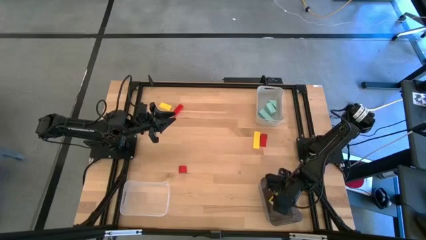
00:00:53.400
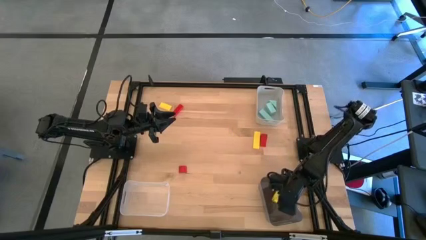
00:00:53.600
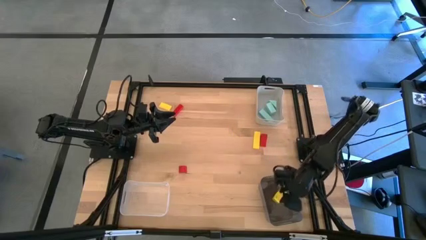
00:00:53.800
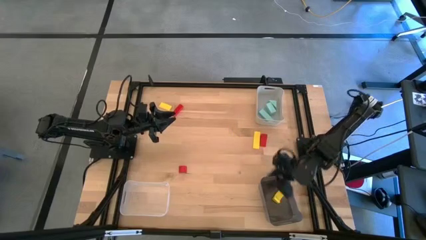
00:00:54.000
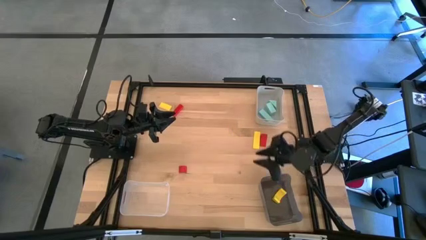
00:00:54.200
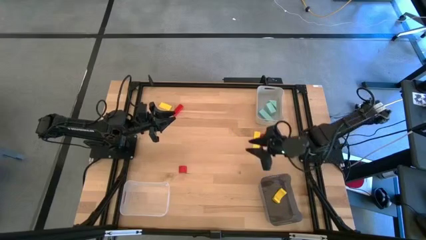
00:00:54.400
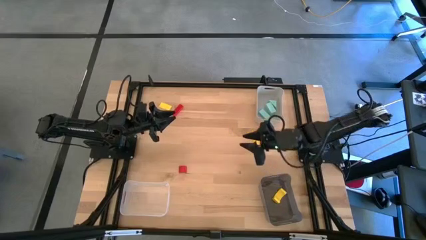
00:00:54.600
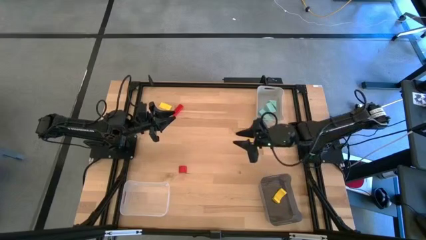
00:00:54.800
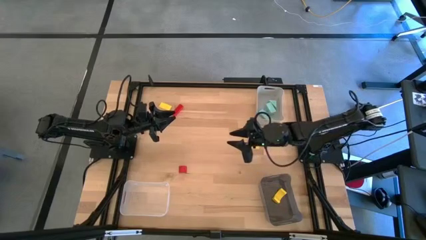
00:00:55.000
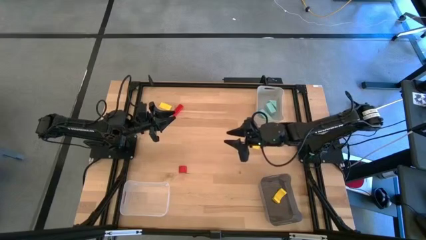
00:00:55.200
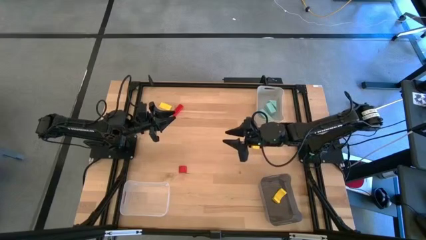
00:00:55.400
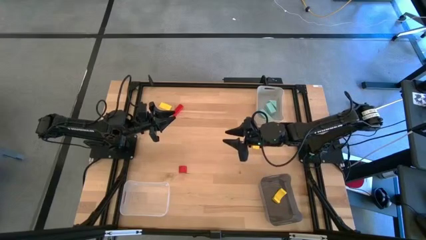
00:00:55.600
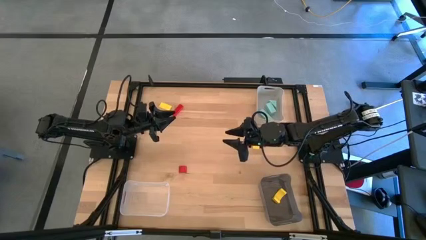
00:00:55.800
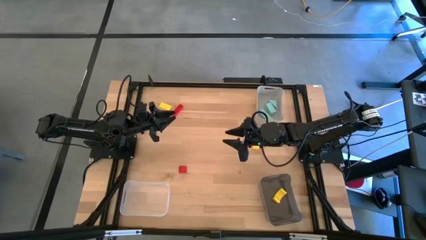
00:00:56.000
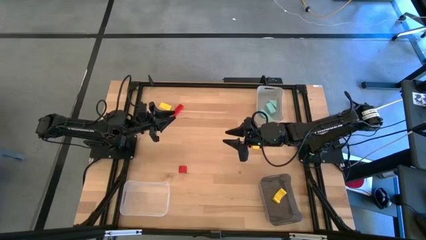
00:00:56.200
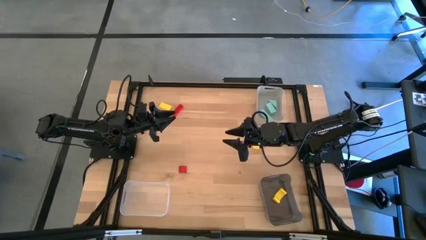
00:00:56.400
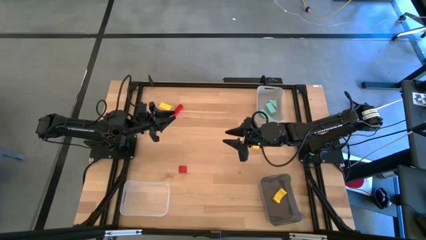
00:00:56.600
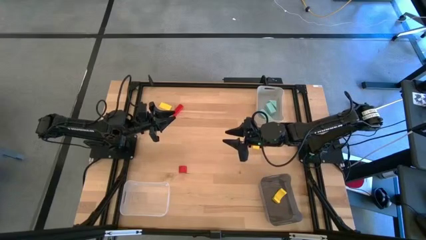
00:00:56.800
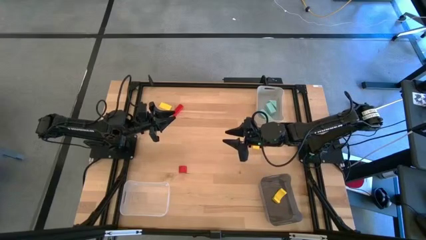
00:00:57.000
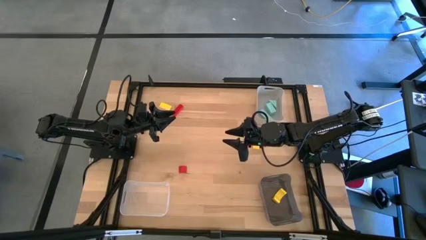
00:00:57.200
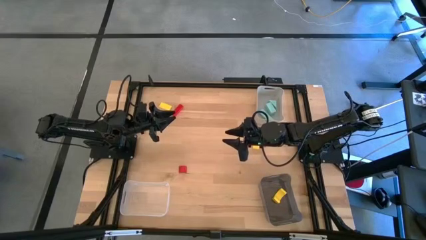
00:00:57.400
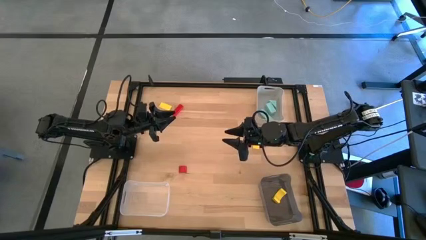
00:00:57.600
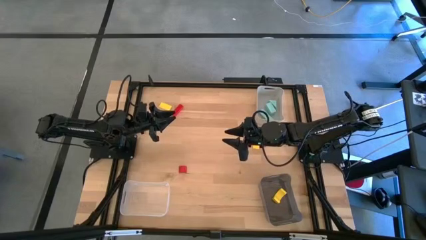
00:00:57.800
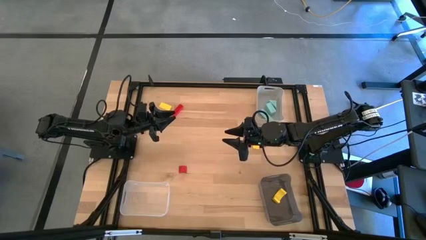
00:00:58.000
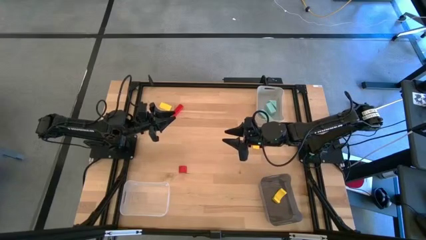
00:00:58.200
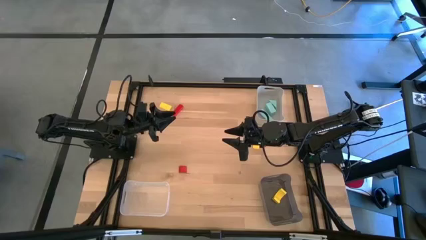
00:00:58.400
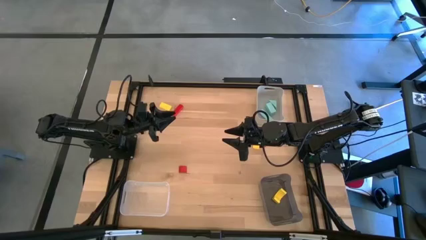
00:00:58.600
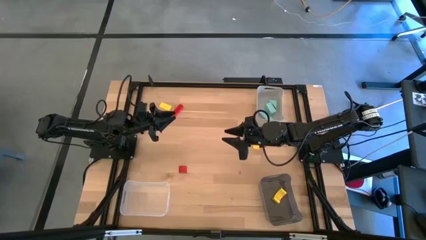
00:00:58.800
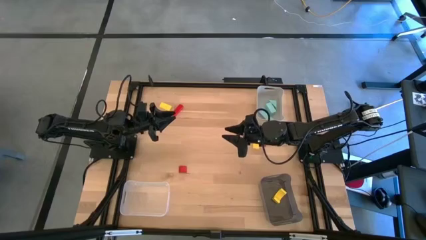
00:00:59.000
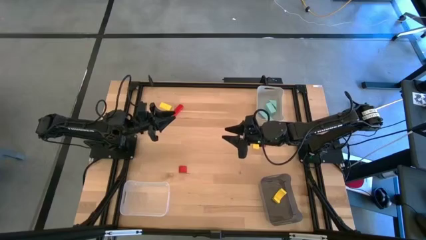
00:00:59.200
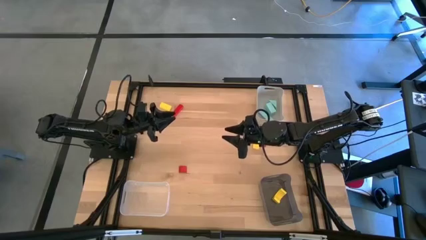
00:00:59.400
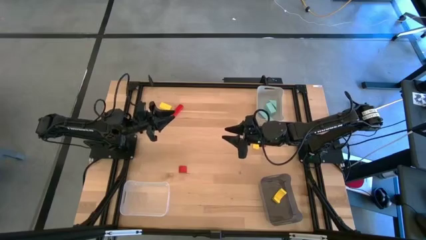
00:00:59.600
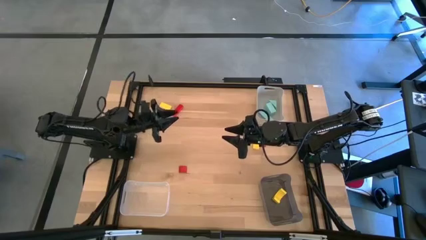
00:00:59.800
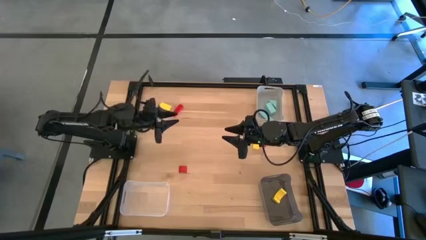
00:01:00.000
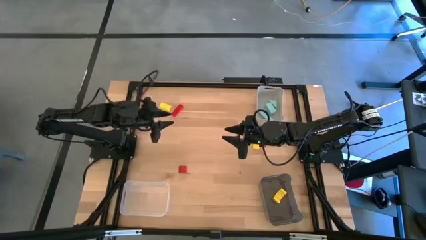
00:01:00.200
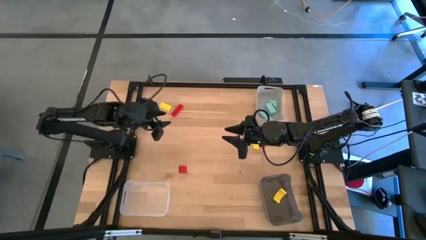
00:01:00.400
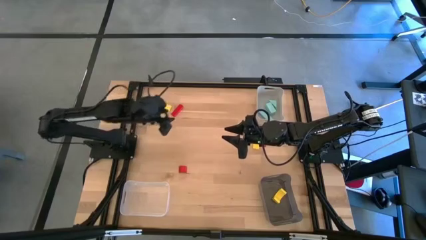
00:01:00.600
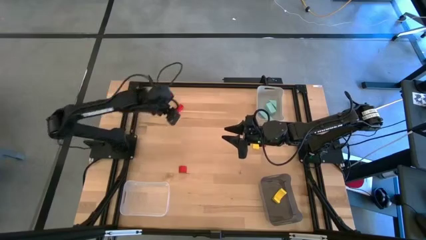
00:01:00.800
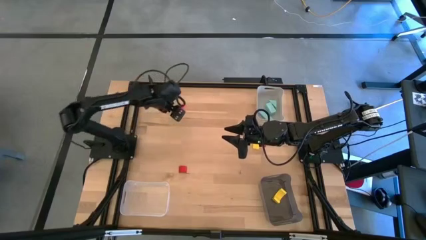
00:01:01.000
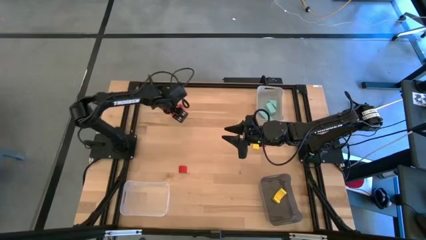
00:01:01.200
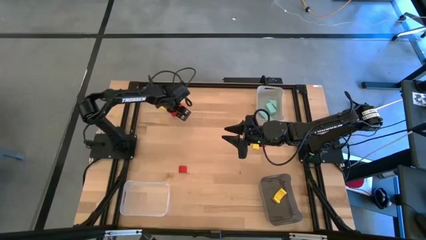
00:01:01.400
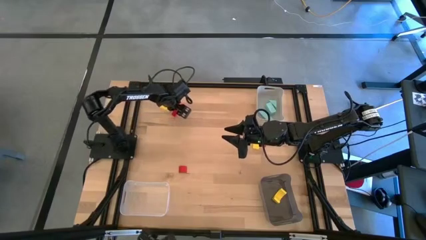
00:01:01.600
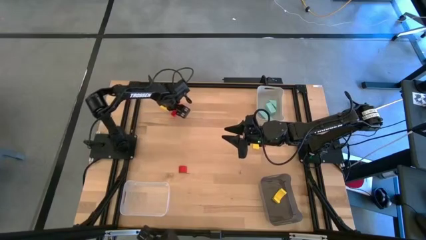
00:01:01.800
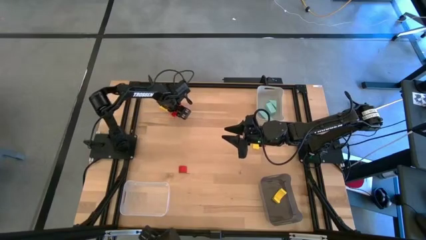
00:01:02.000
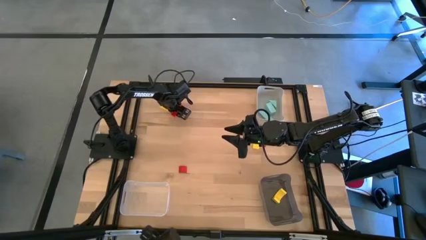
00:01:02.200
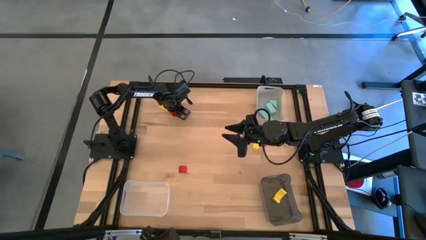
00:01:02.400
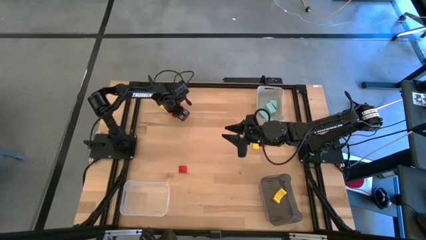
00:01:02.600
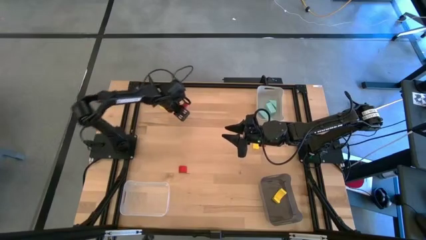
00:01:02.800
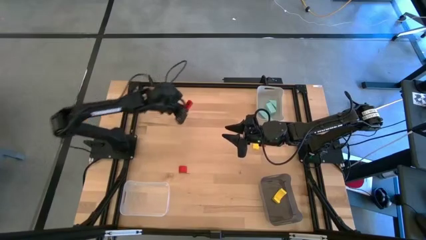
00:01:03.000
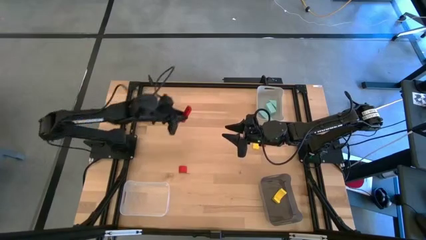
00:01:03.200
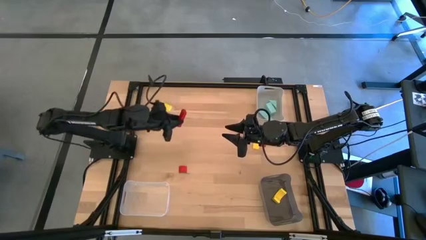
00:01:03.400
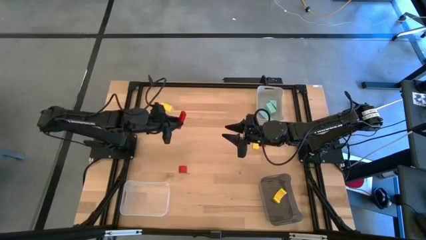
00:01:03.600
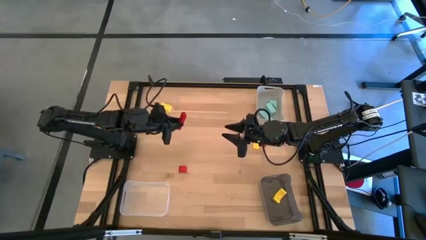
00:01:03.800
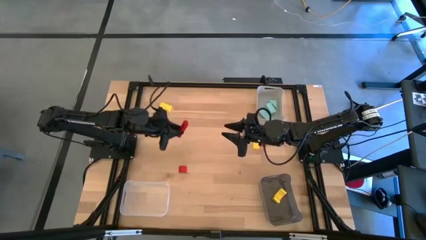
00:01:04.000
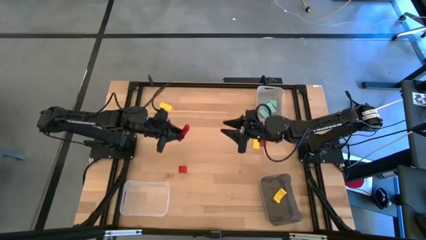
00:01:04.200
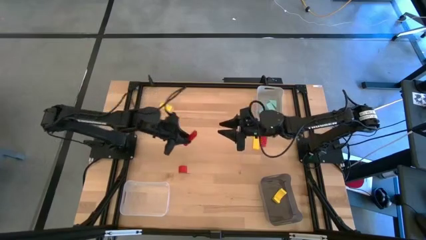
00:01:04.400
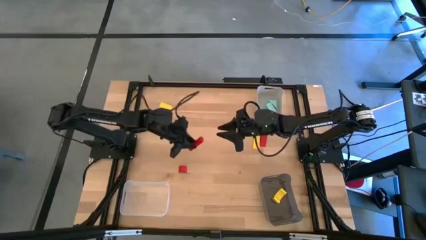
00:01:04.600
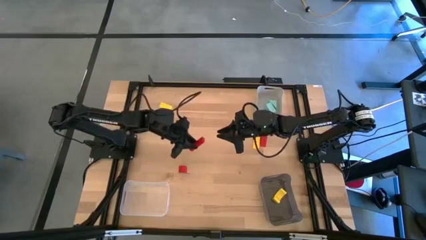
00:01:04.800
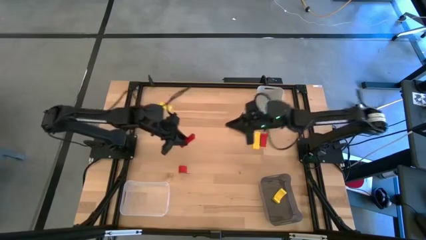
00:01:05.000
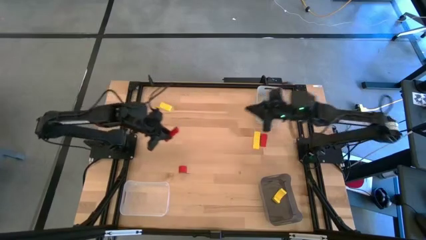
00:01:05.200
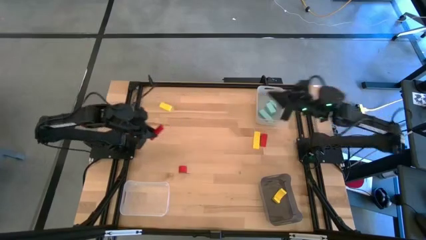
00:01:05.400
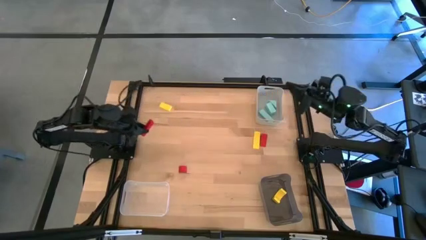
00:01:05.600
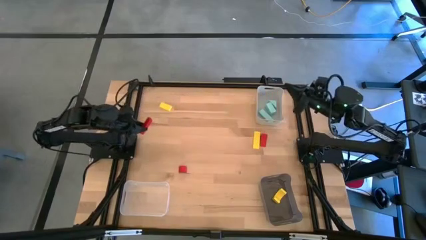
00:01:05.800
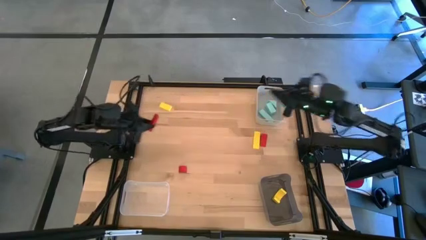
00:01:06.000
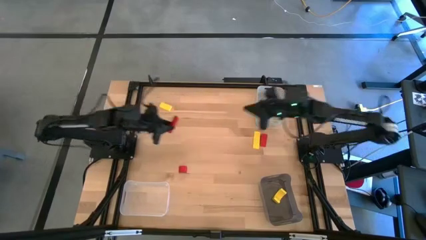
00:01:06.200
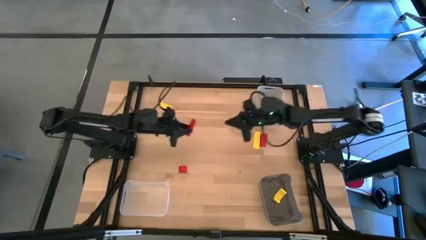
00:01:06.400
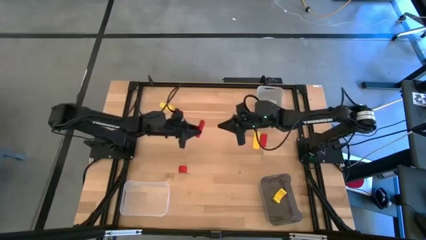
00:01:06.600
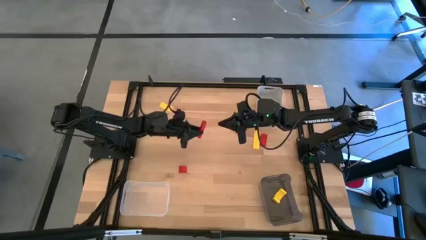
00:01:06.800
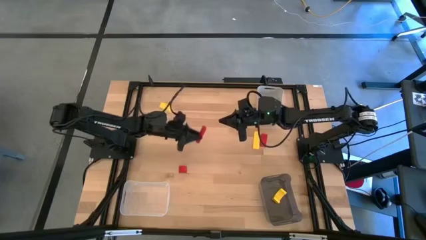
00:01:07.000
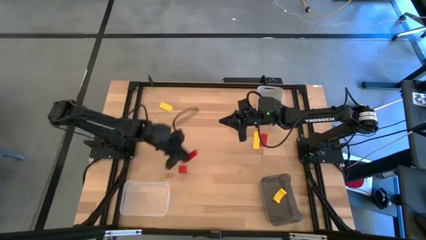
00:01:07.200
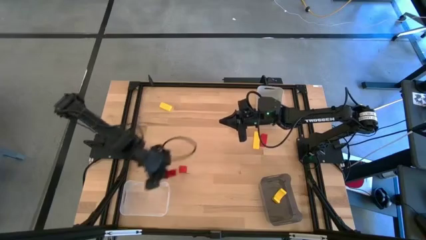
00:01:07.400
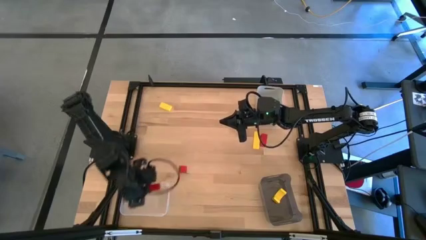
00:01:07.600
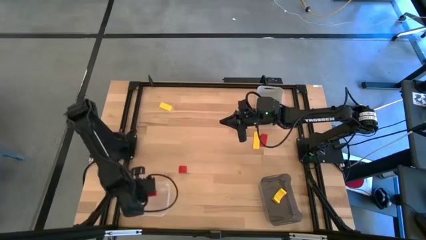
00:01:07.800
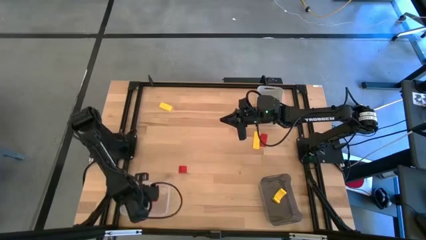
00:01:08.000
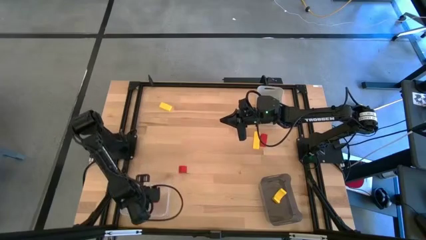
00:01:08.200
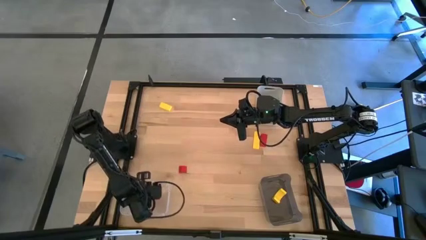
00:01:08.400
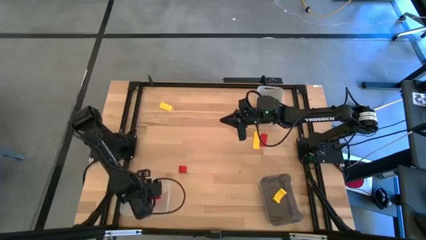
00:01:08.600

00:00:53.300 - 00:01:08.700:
Task: Sort & place blocks by color
Put the top left red block into the white bin

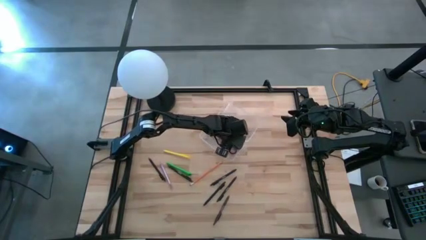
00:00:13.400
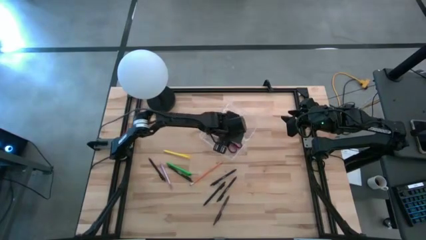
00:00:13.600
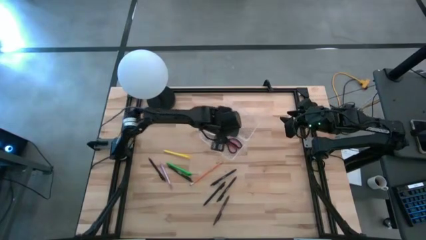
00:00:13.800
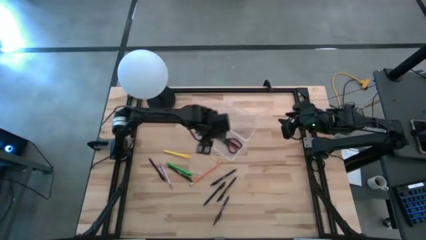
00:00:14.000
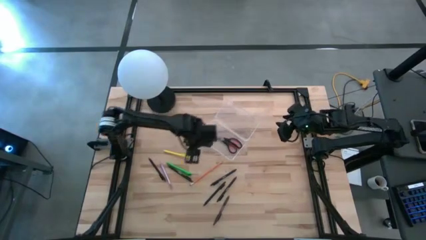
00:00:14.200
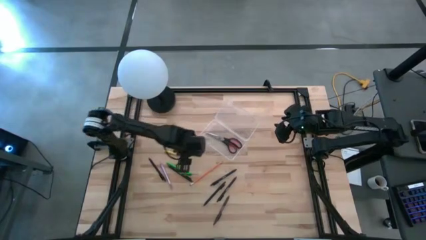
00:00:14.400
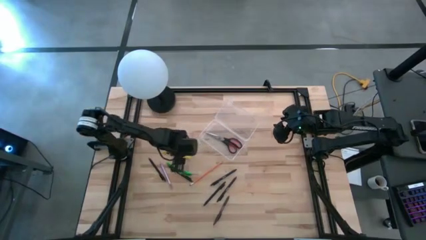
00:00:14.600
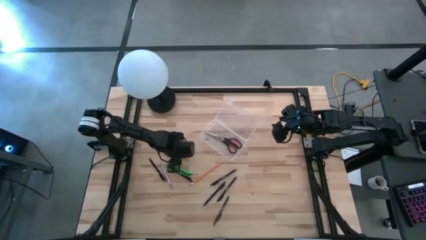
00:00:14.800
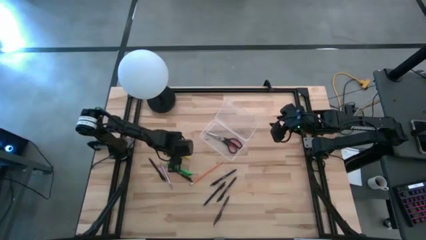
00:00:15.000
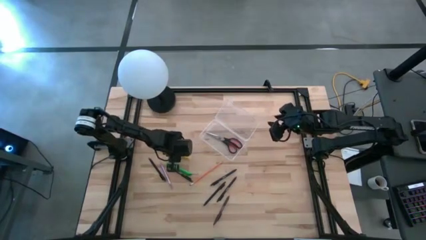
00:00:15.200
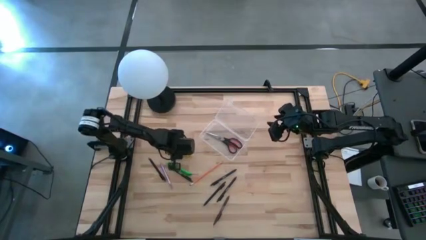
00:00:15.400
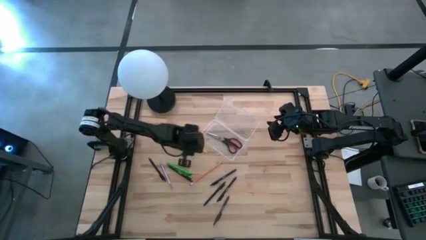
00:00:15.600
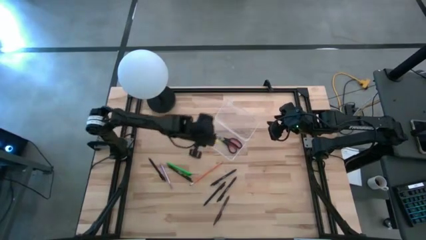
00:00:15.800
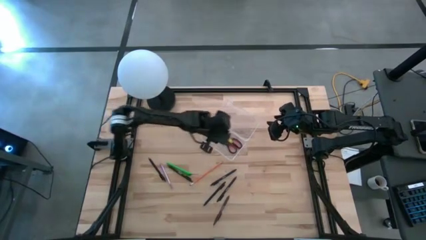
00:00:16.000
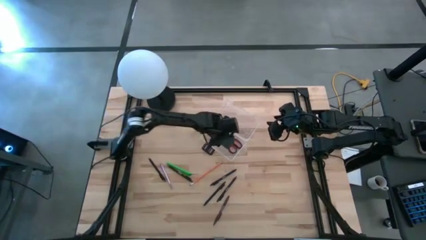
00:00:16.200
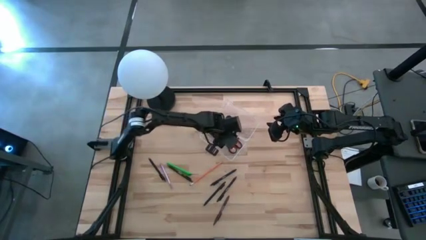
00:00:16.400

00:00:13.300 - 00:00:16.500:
Task: Pick & place school supplies into a supply box
Put the yellow pen into the transparent supply box
